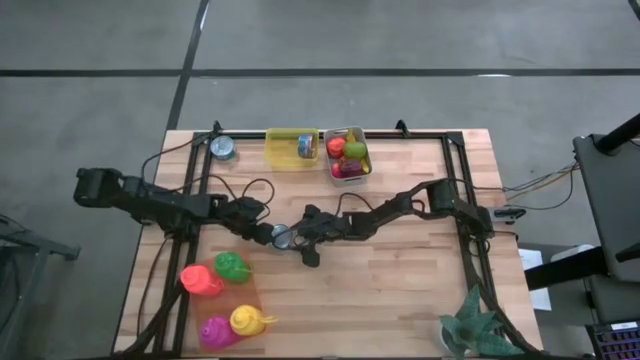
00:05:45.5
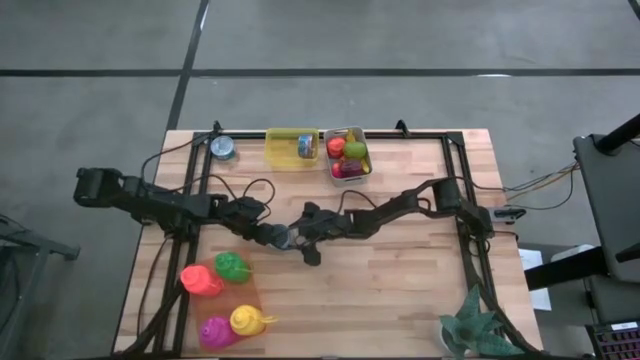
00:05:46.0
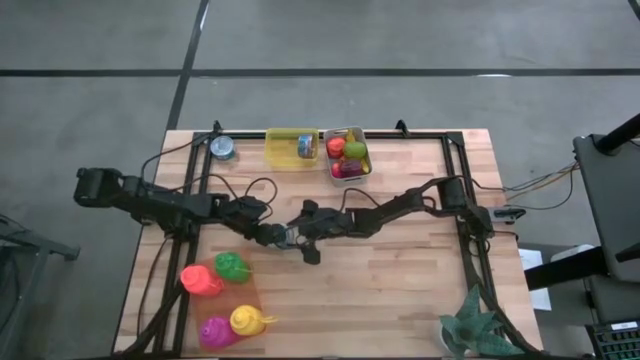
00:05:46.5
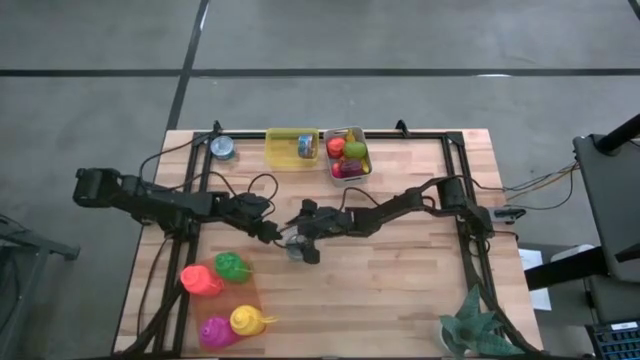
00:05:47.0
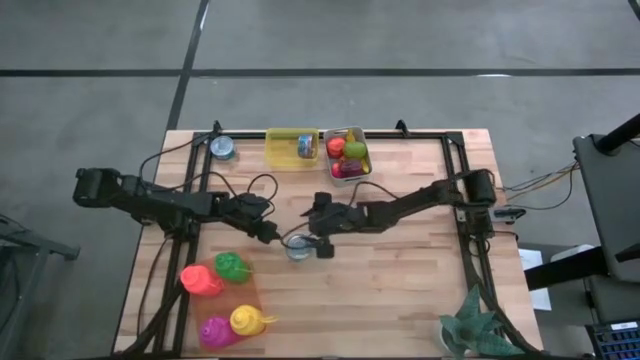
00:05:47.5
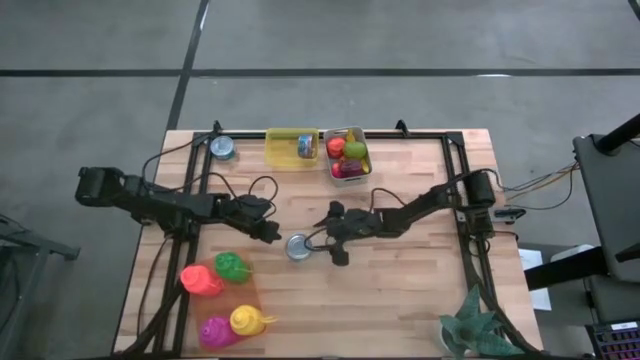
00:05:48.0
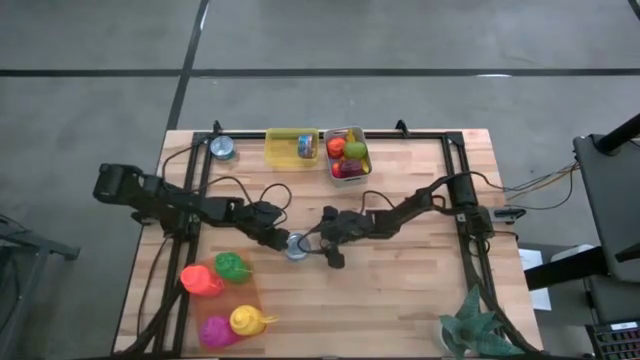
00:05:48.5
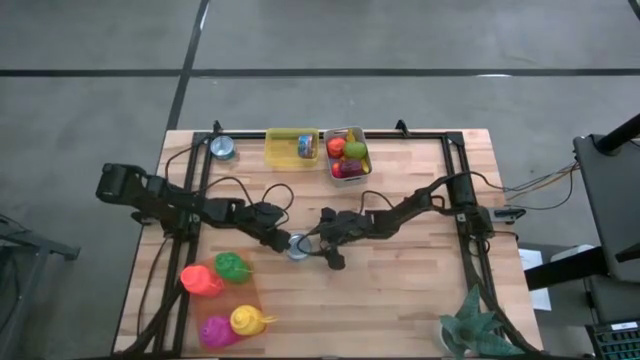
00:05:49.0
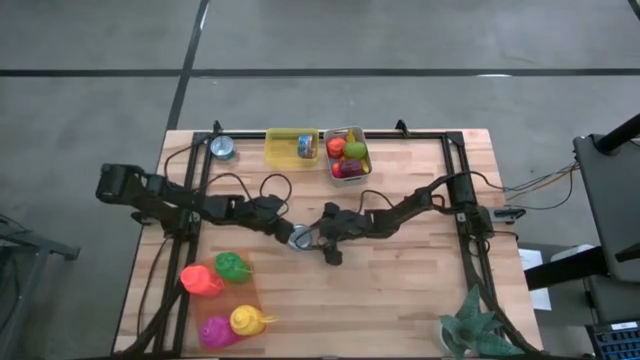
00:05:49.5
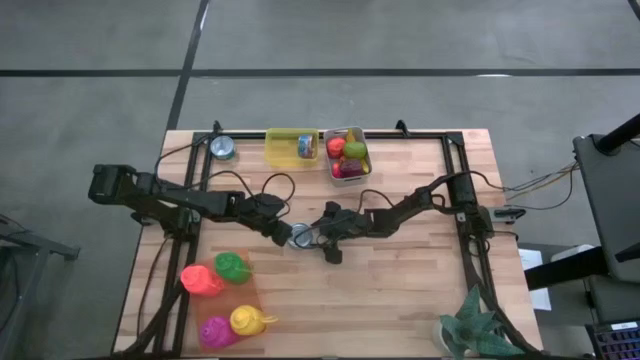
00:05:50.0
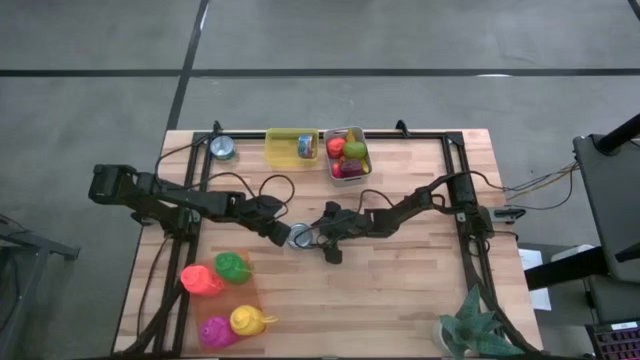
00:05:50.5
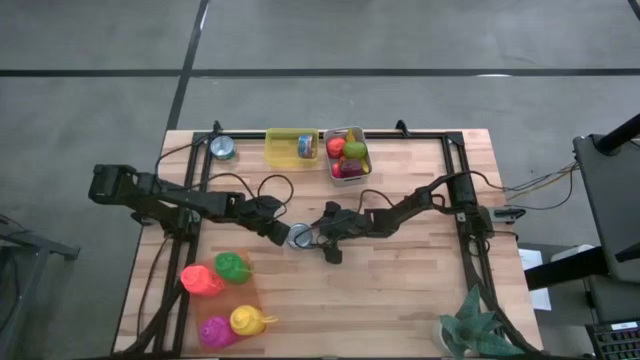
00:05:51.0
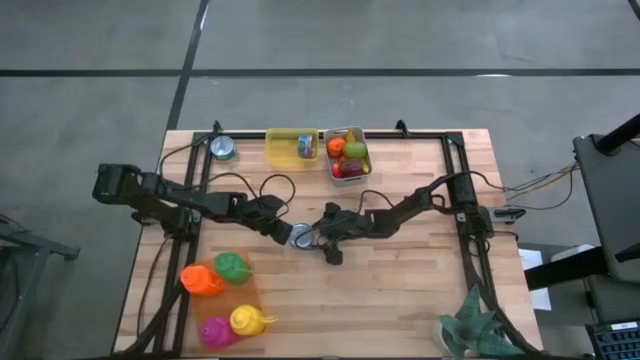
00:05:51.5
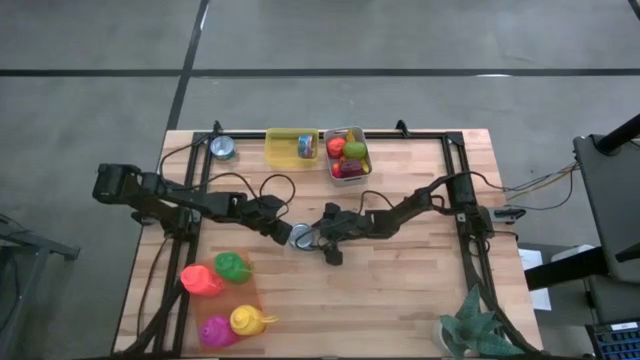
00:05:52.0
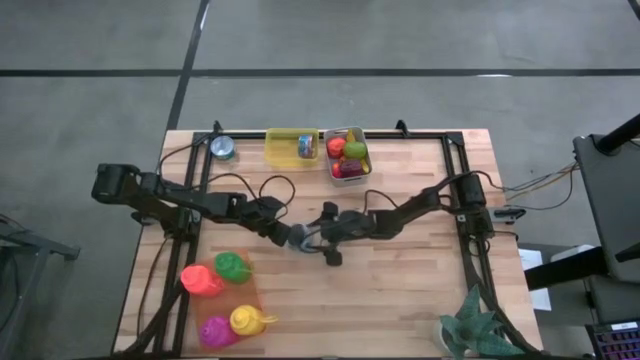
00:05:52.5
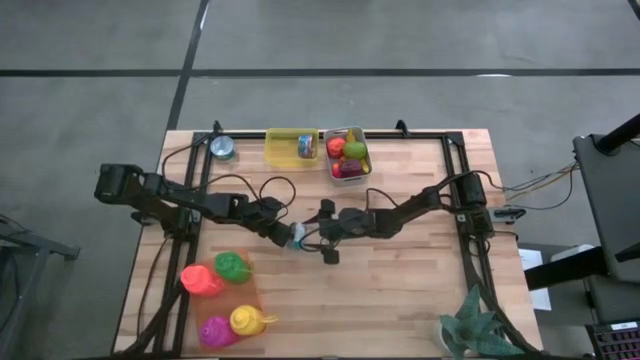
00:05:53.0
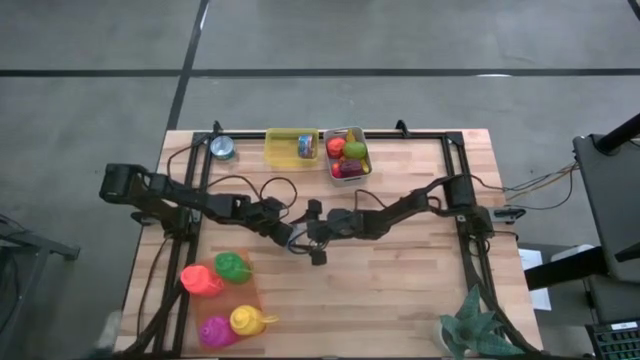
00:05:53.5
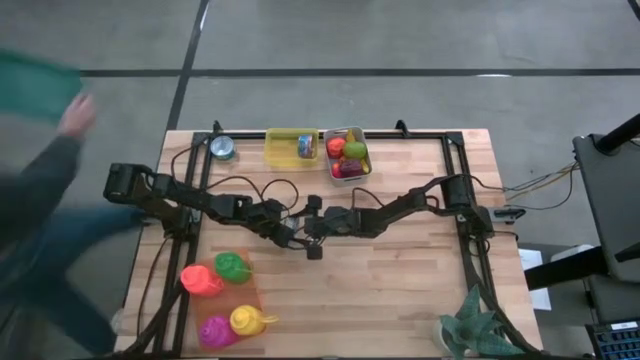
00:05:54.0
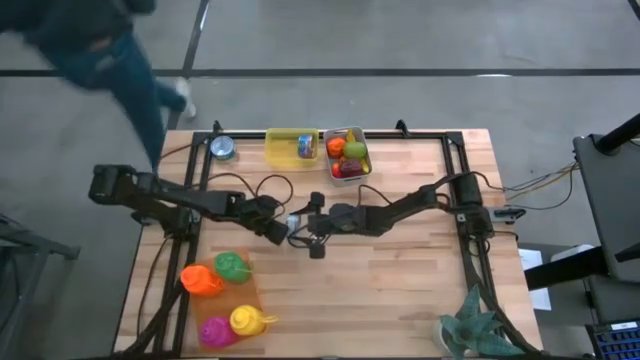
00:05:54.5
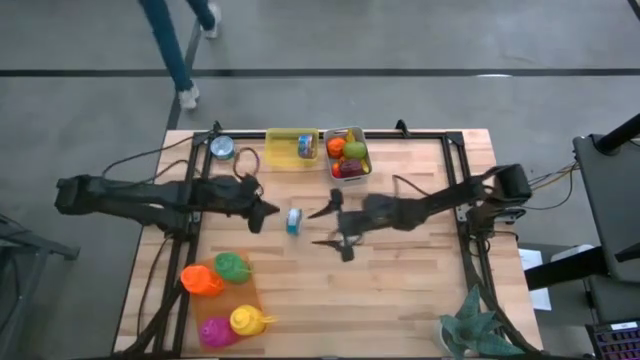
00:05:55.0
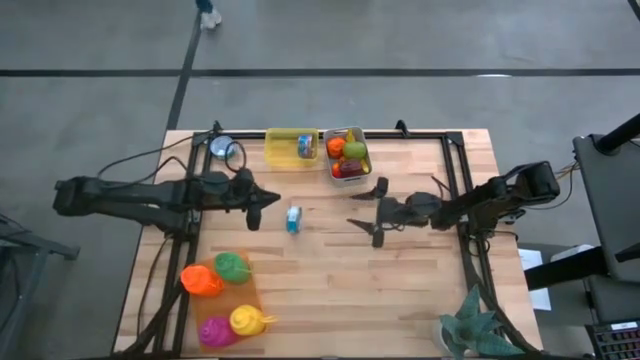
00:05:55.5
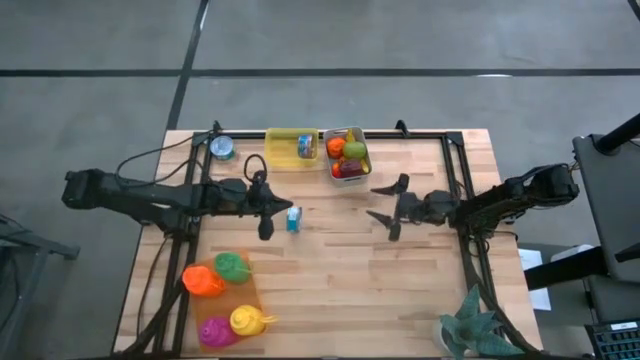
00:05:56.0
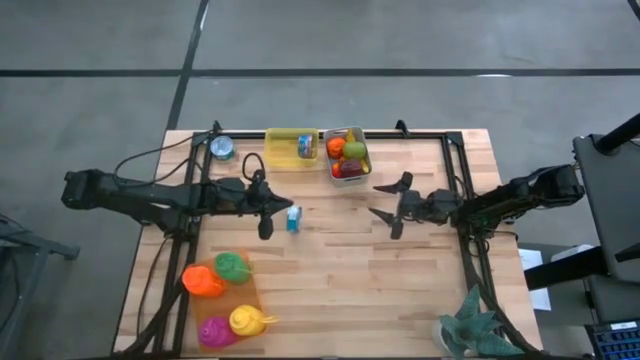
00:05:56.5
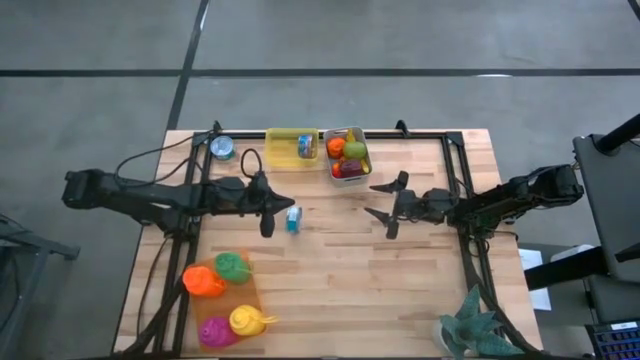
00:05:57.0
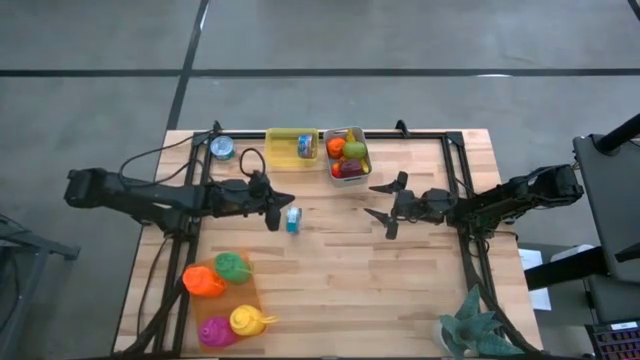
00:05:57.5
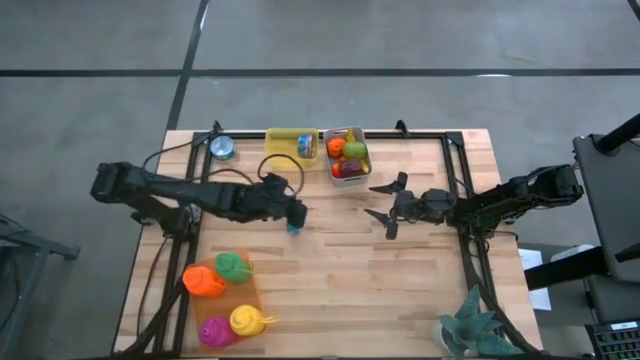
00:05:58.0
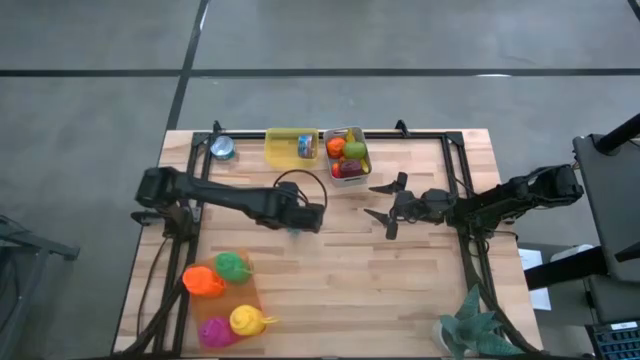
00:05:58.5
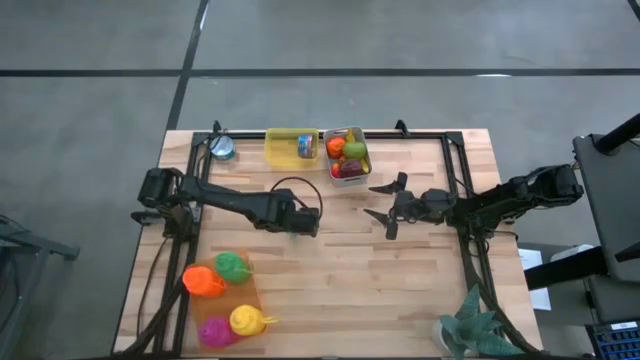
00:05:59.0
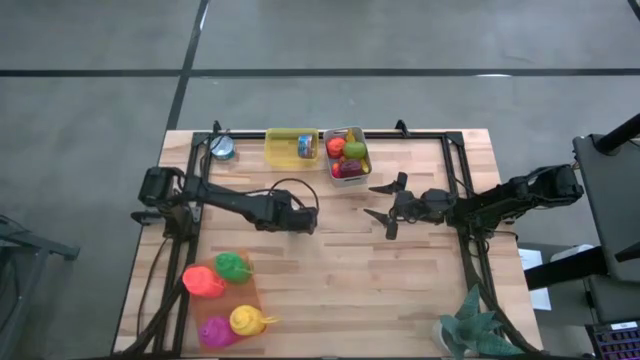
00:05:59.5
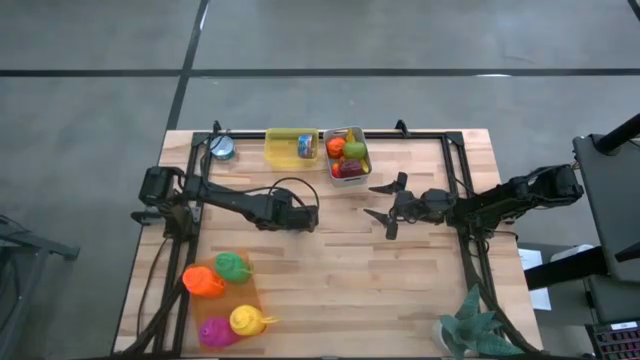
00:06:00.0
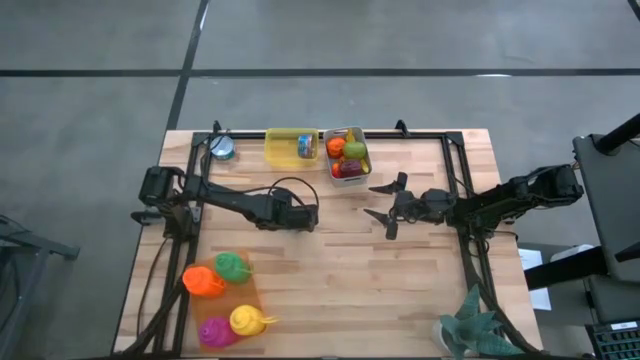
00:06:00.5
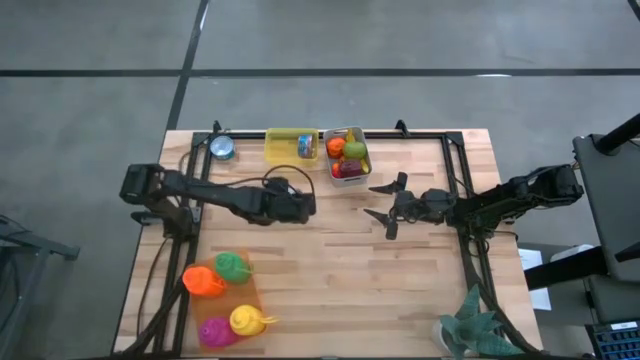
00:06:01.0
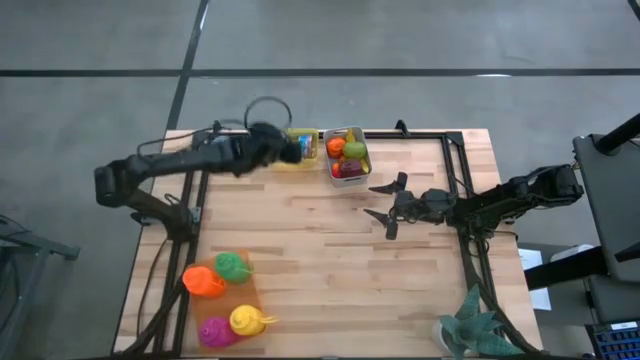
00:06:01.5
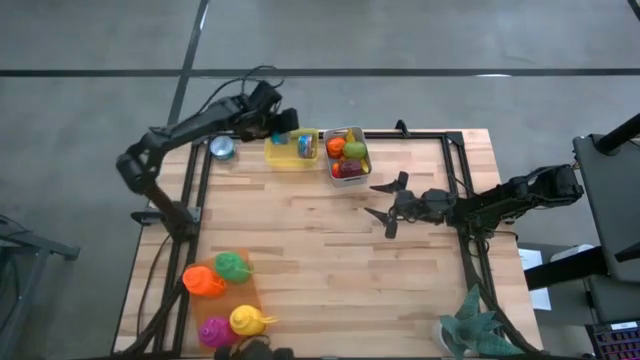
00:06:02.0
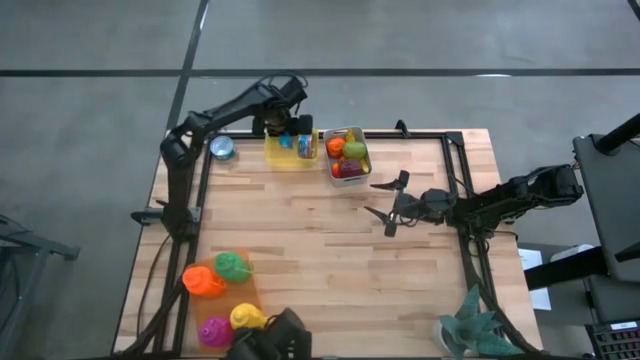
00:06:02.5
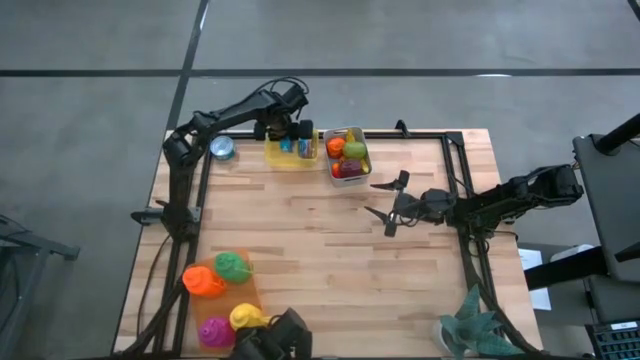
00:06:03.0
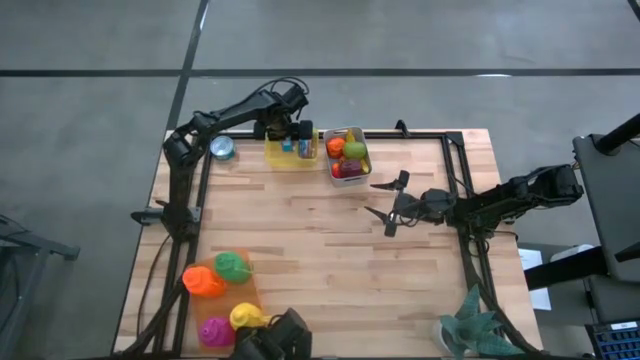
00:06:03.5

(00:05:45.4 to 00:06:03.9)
Task: Pick & Place Food Item
Put the blue tuna can into the yellow bin
